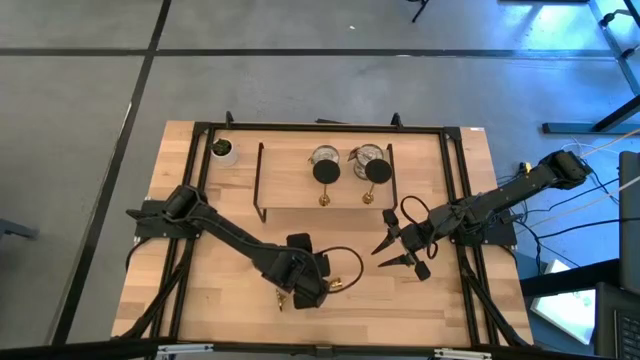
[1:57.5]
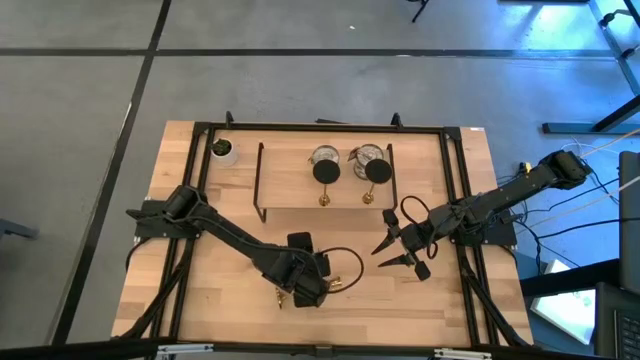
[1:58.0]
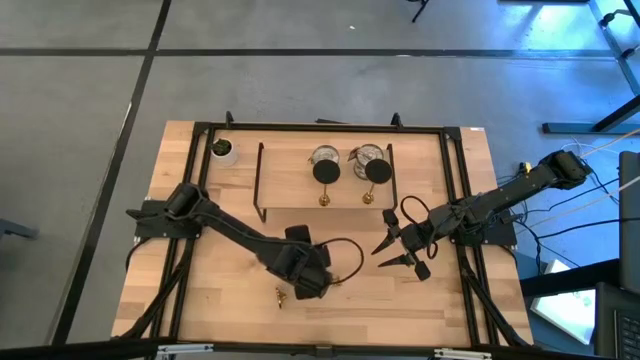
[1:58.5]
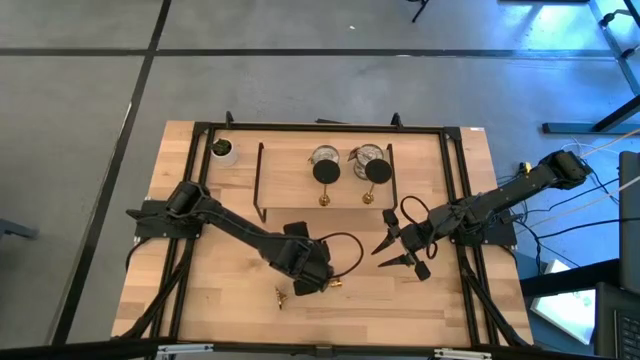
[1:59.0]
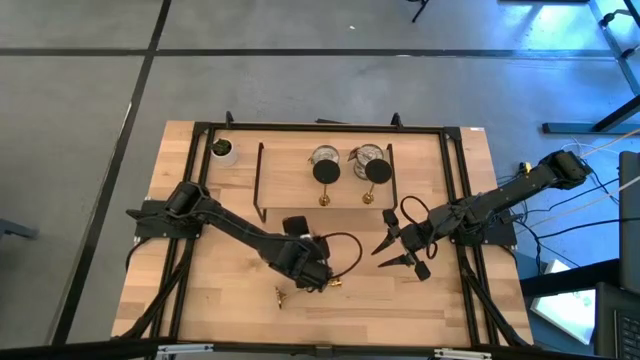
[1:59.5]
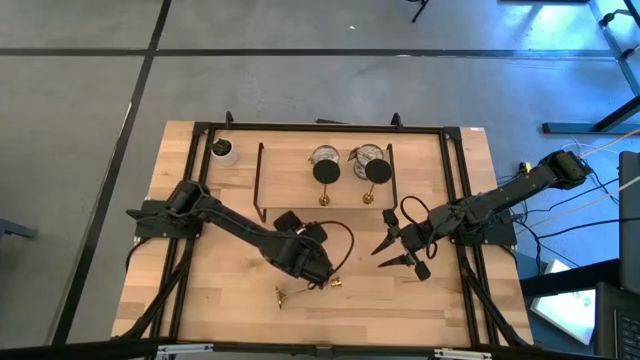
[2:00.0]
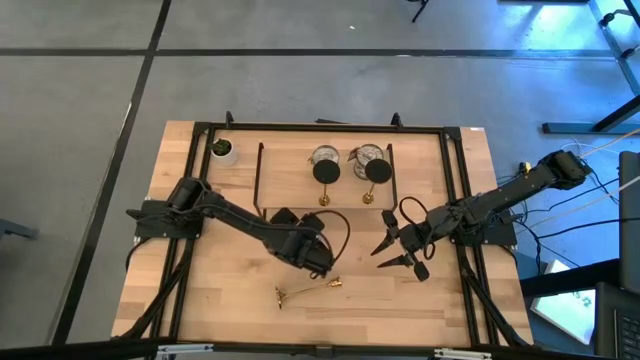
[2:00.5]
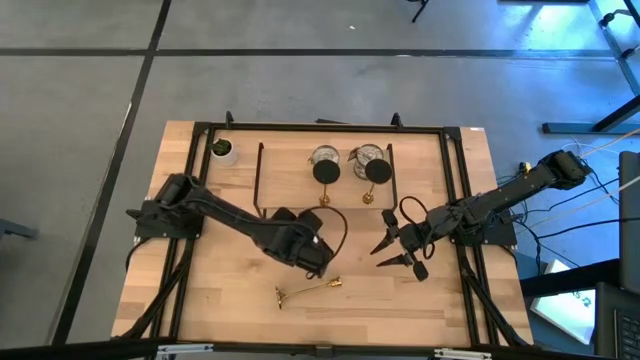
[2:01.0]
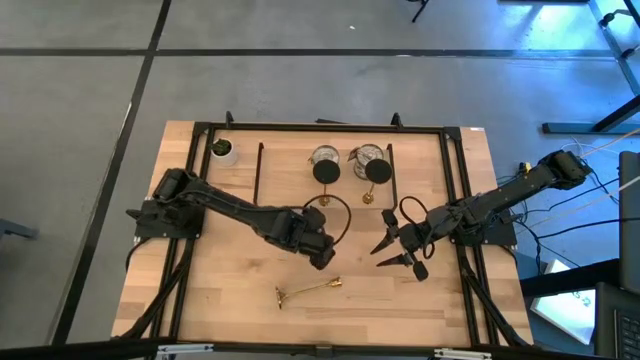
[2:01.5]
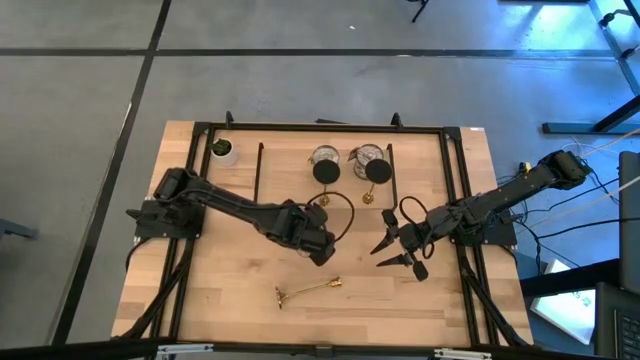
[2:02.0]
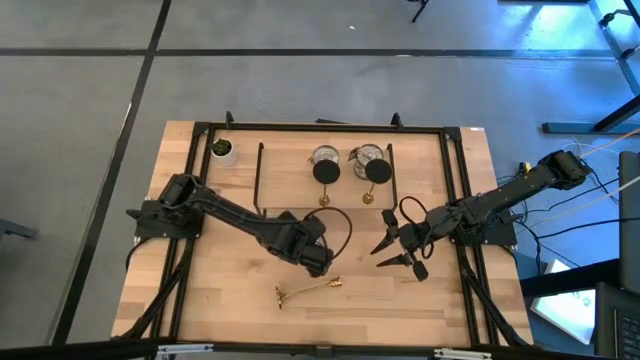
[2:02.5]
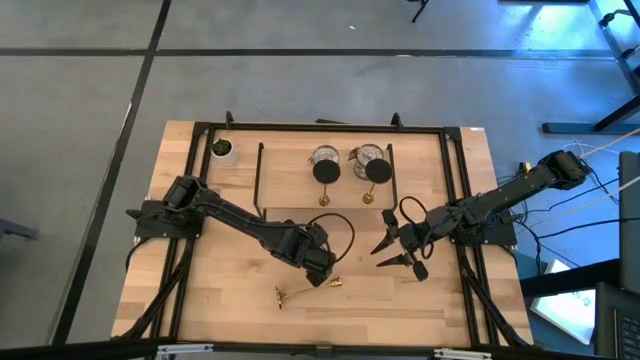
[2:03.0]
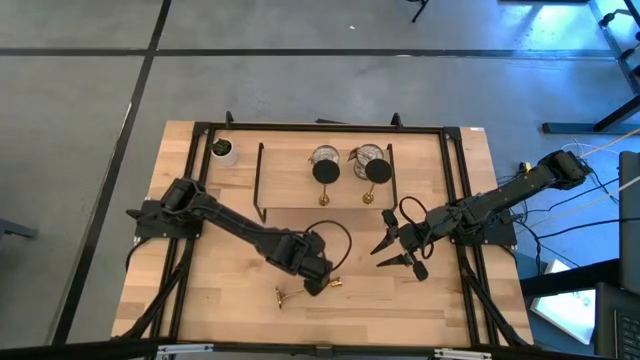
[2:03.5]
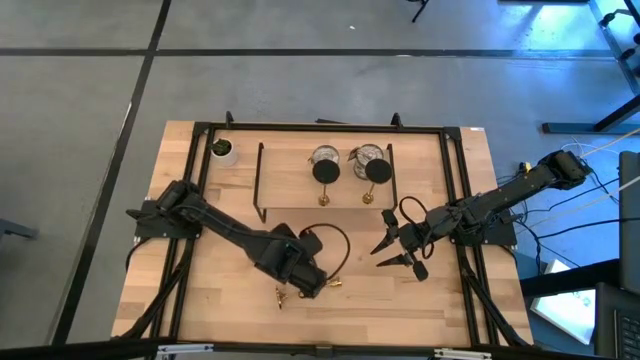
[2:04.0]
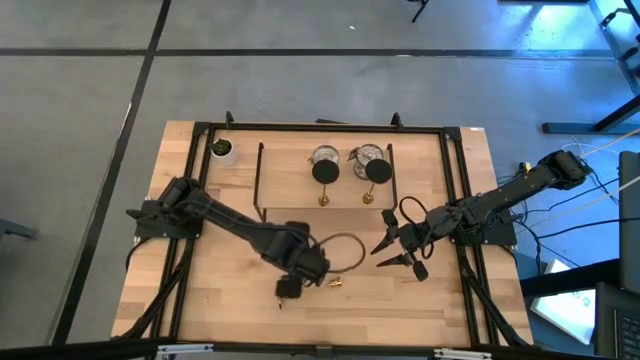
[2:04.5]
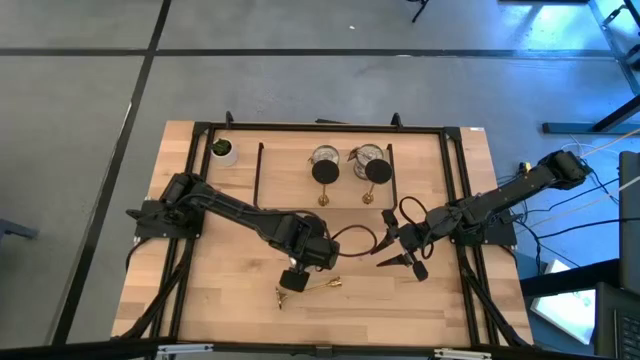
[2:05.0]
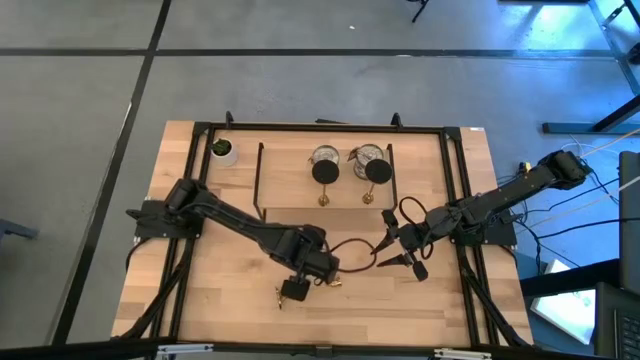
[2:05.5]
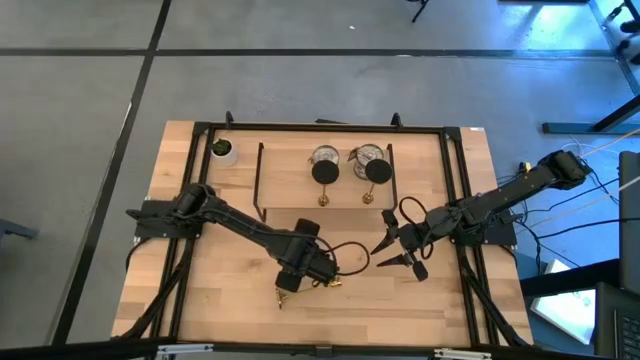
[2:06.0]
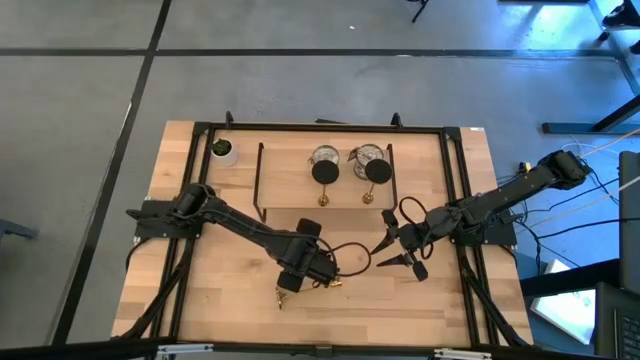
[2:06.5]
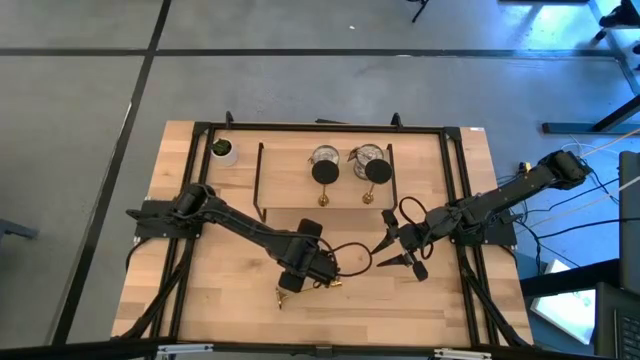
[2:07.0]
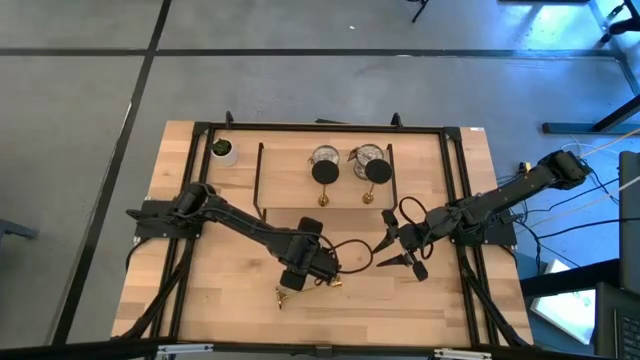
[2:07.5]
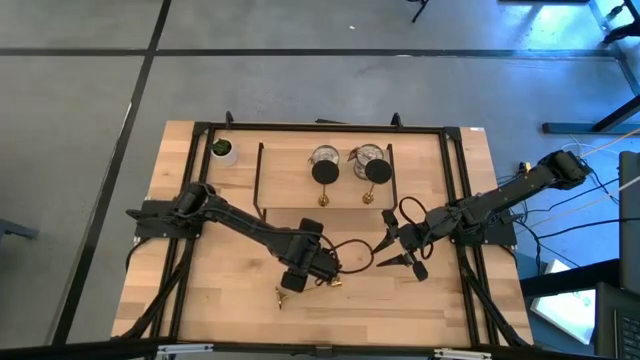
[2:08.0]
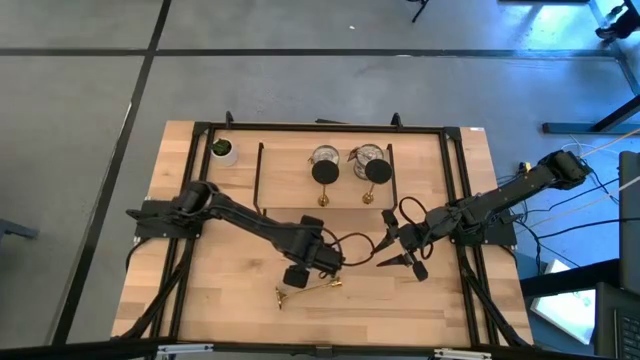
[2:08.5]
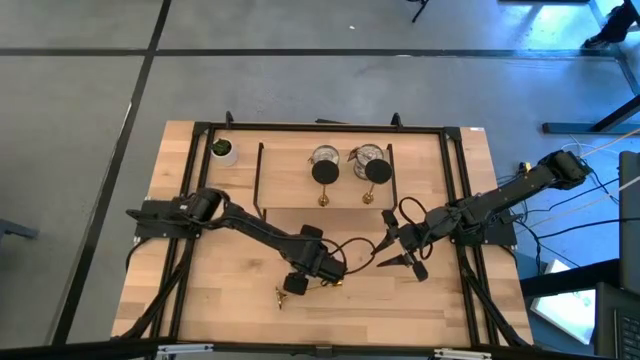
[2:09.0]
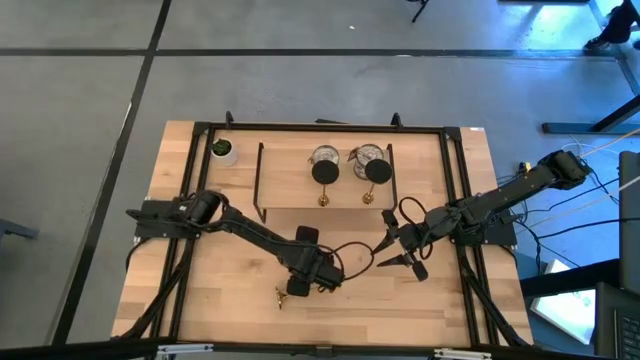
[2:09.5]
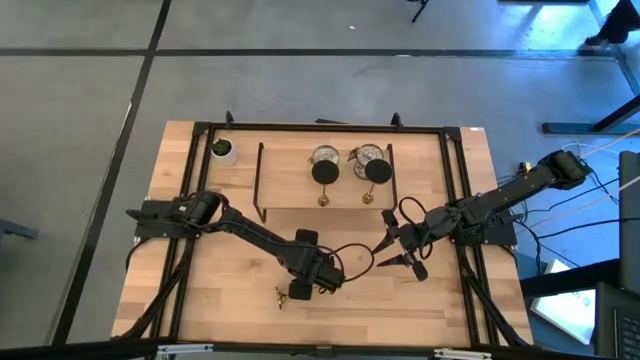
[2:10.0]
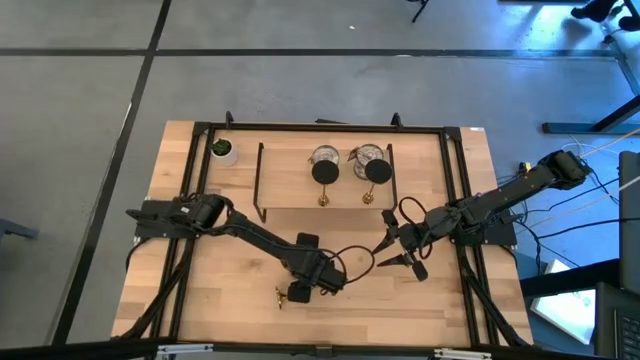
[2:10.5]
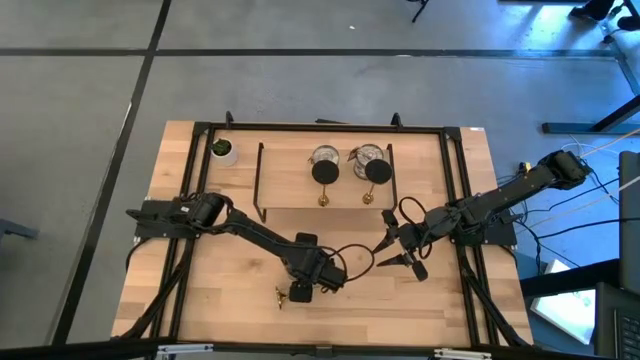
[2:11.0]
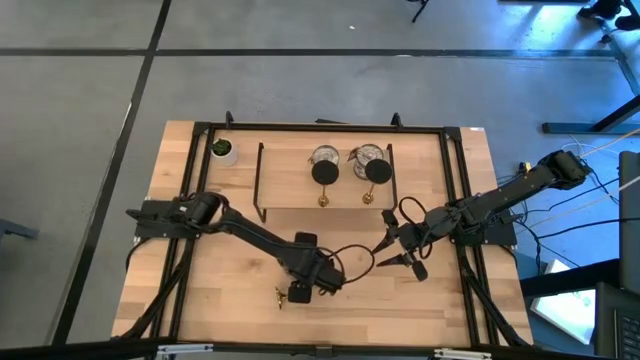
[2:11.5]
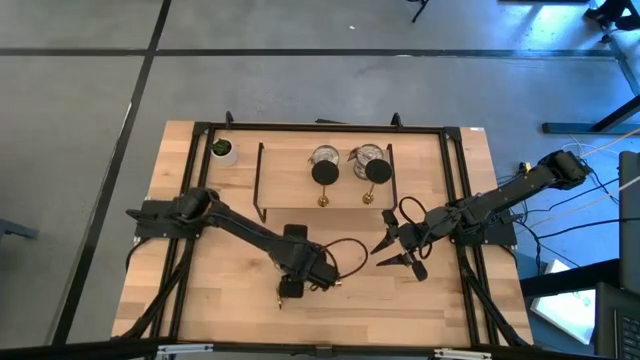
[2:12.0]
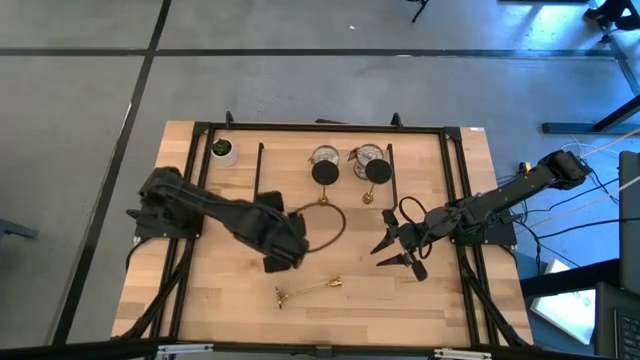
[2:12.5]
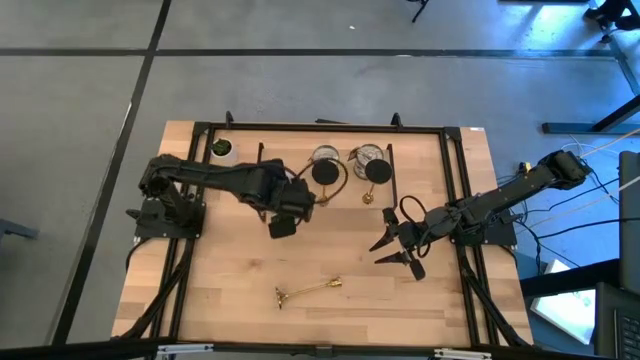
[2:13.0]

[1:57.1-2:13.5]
Task: Pick & Place candle stick holders
Put the silver scented candle on the shelf

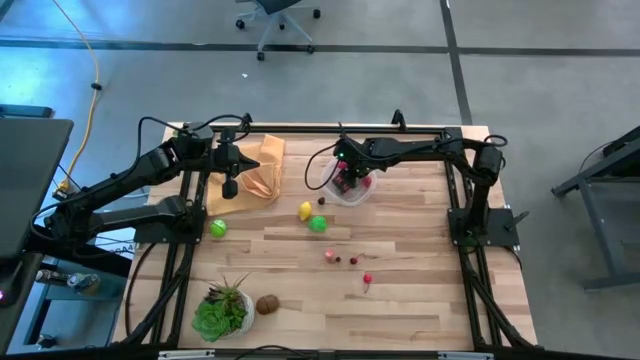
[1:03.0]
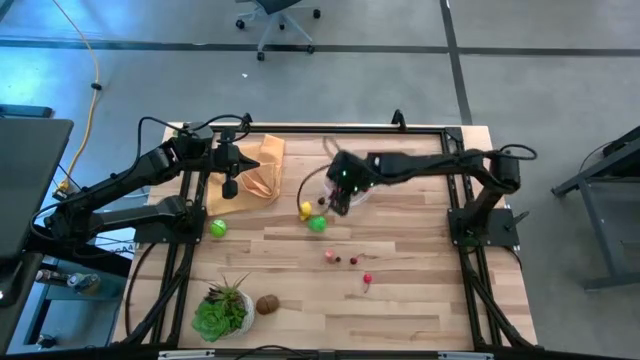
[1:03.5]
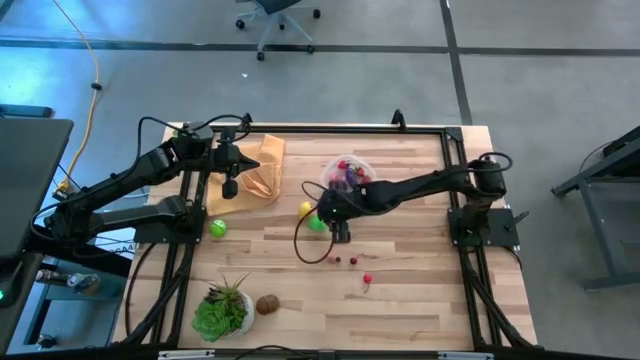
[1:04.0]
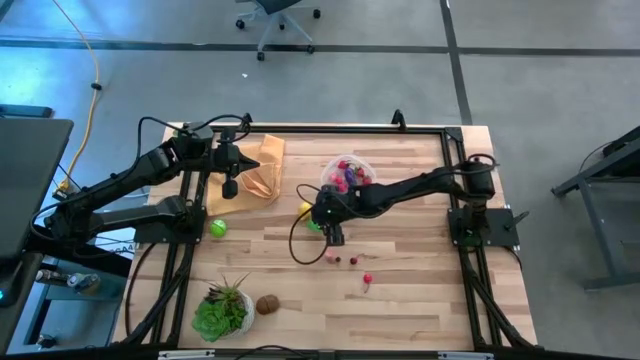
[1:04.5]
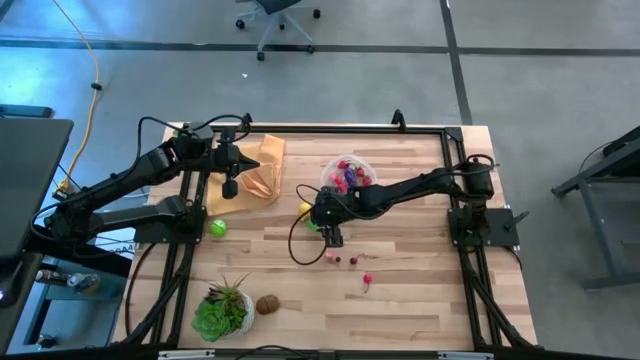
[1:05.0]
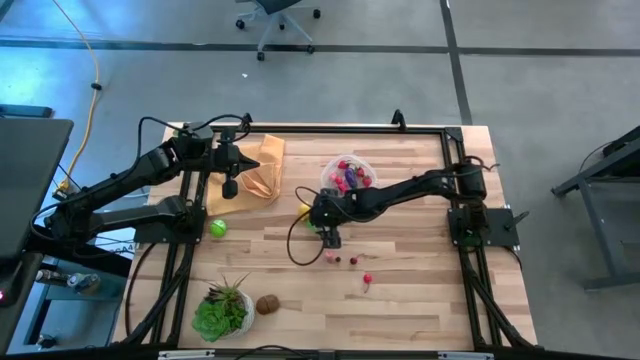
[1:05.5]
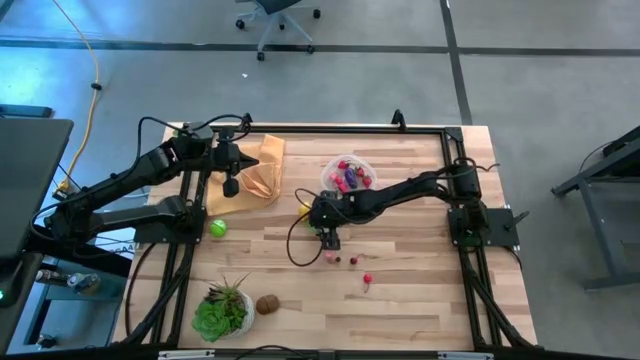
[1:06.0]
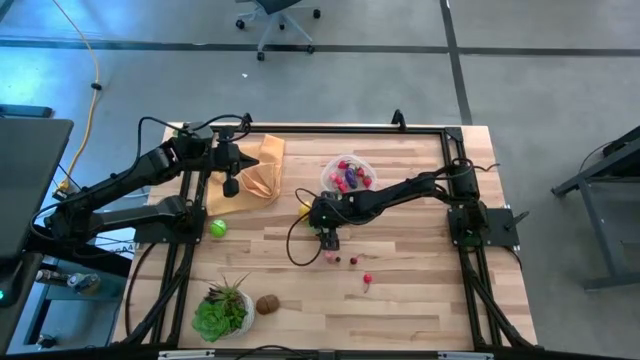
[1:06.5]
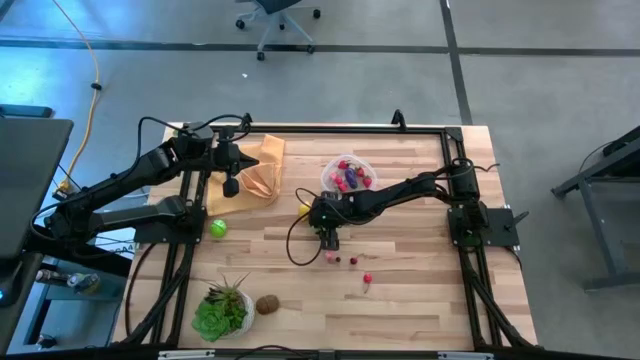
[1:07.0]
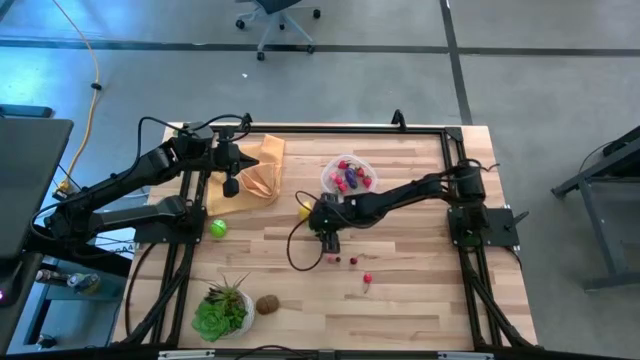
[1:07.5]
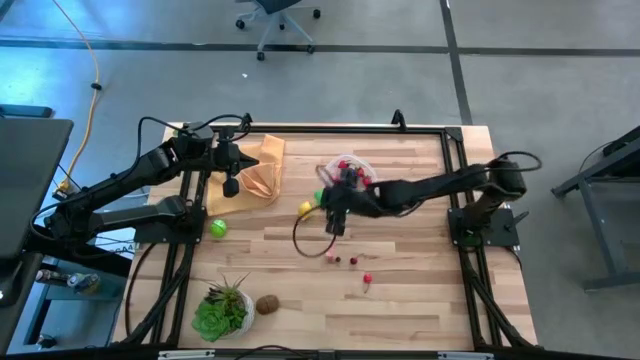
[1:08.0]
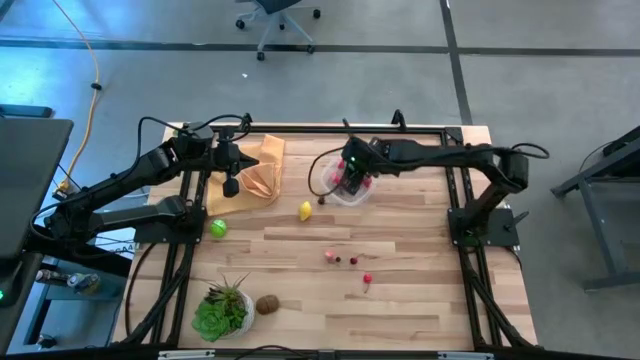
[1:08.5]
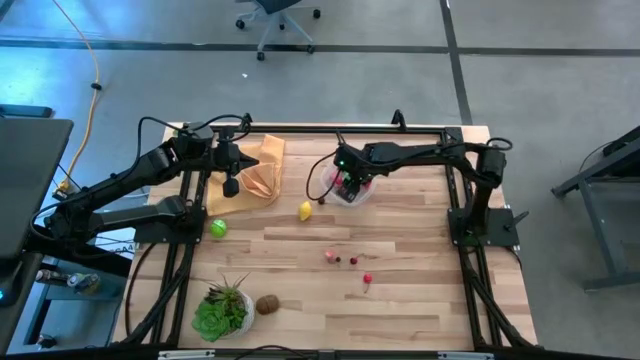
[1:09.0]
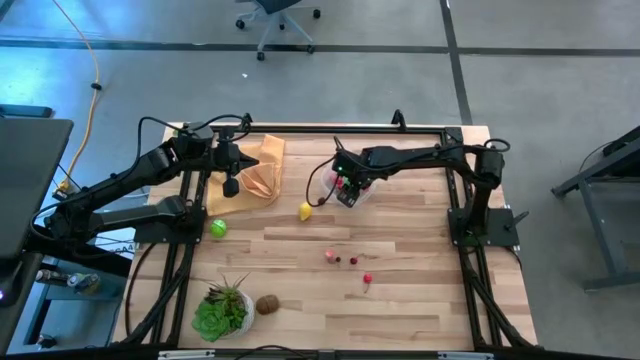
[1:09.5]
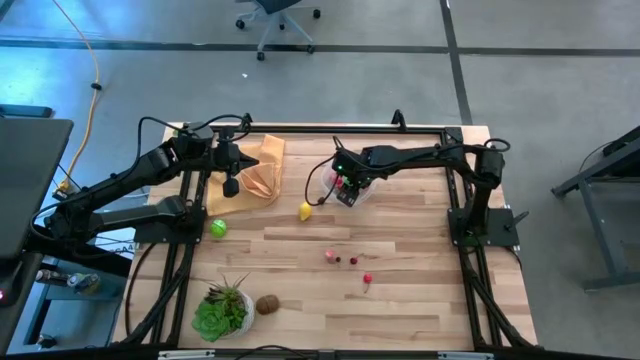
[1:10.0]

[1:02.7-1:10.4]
Task: Pick and placing Produce into tupperware
Put the green pear into the transparent container
